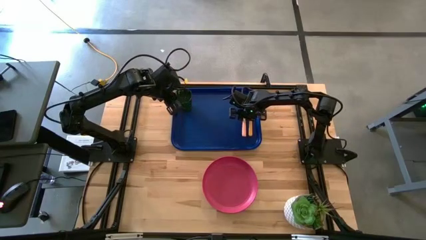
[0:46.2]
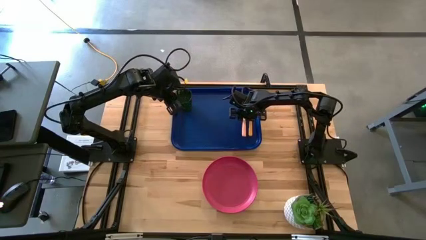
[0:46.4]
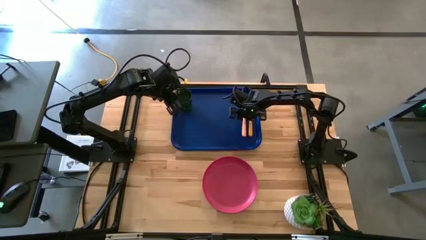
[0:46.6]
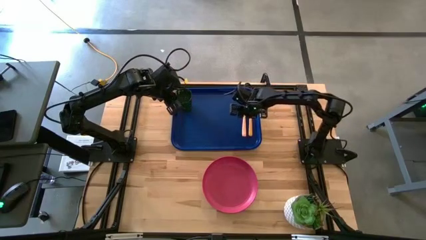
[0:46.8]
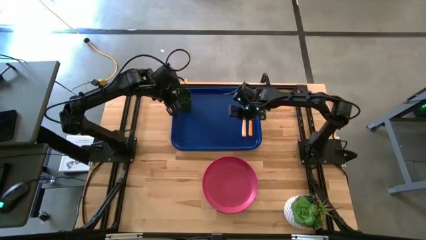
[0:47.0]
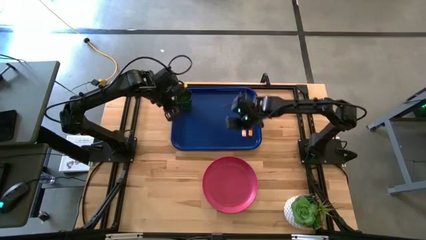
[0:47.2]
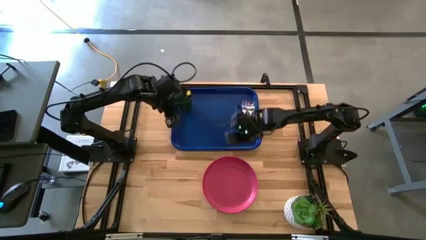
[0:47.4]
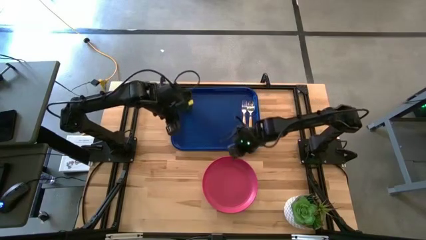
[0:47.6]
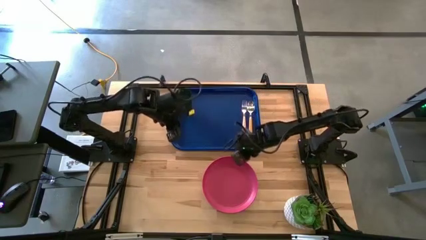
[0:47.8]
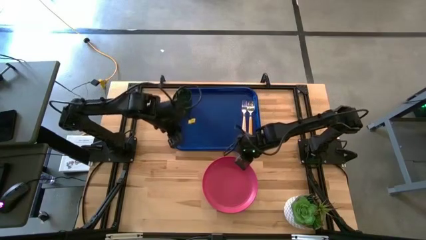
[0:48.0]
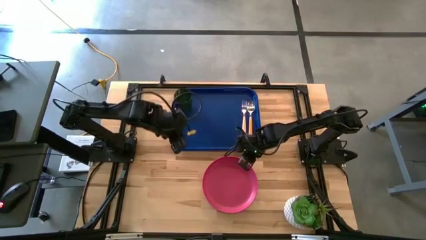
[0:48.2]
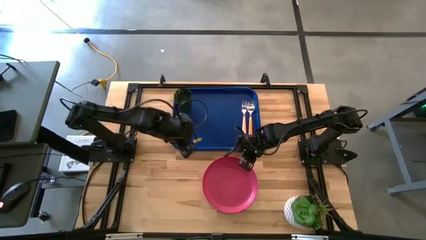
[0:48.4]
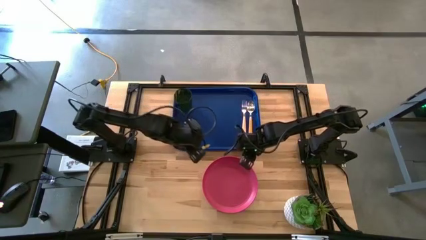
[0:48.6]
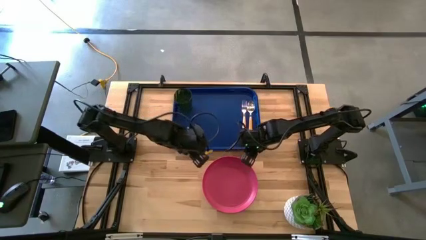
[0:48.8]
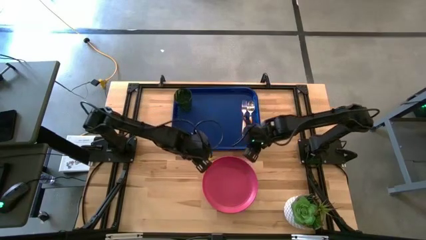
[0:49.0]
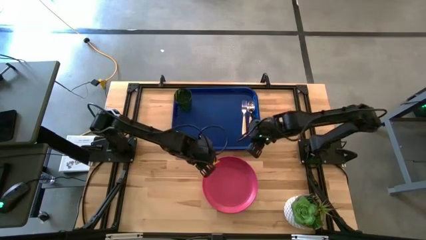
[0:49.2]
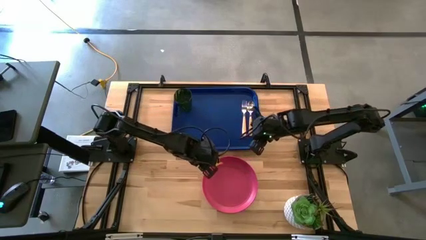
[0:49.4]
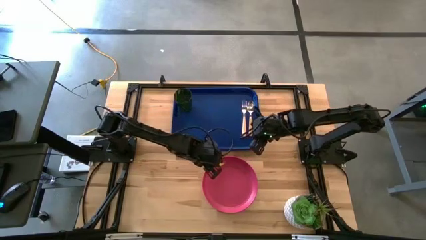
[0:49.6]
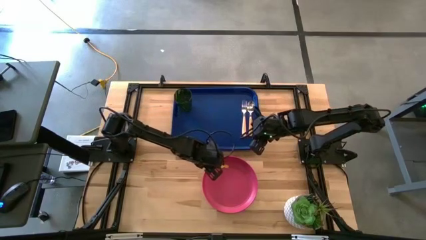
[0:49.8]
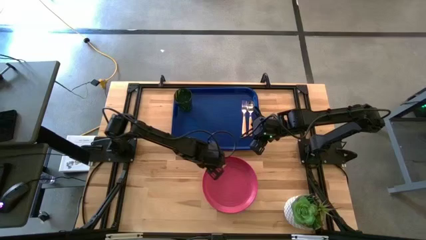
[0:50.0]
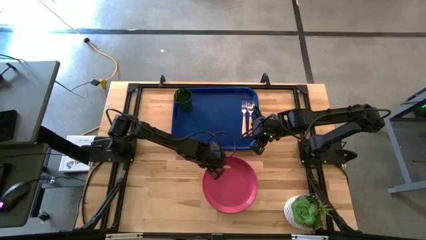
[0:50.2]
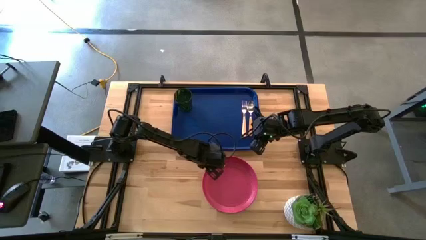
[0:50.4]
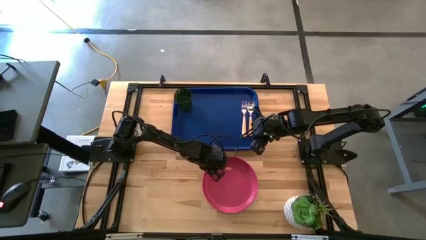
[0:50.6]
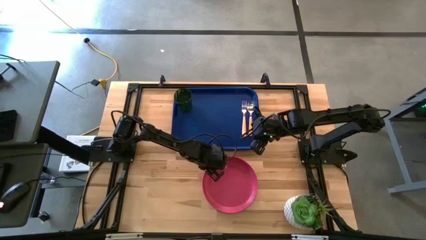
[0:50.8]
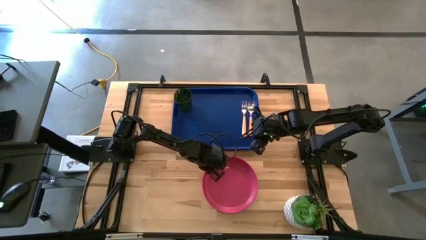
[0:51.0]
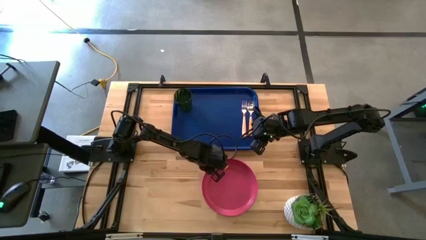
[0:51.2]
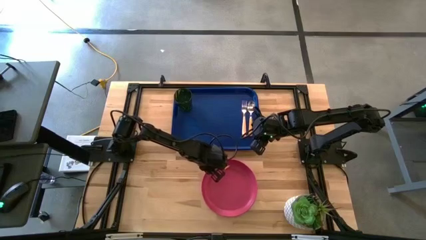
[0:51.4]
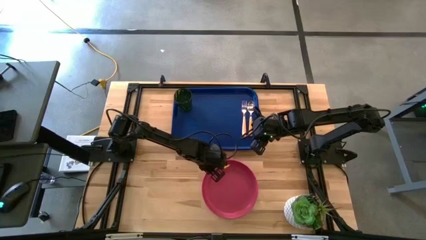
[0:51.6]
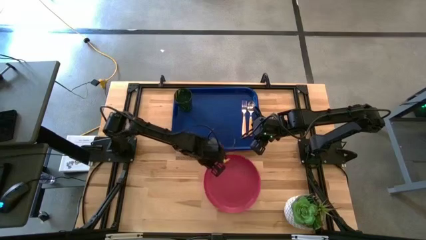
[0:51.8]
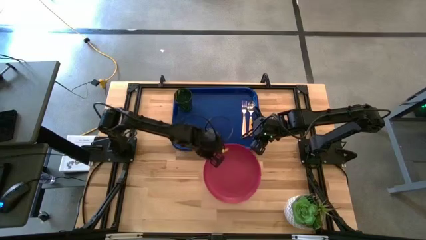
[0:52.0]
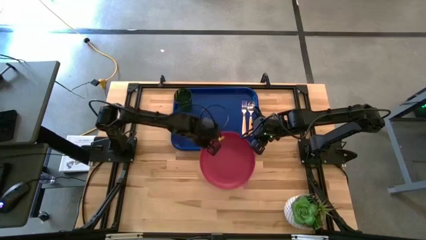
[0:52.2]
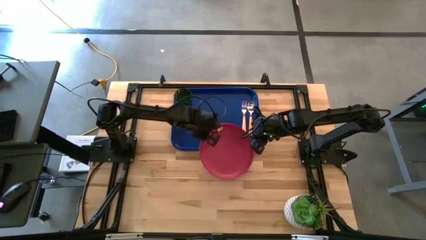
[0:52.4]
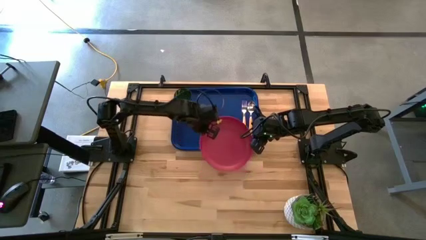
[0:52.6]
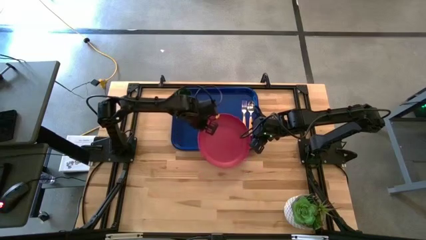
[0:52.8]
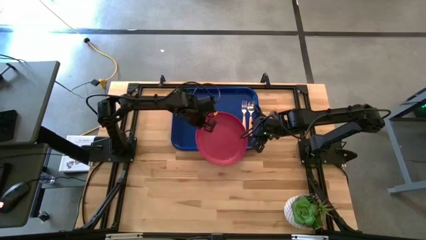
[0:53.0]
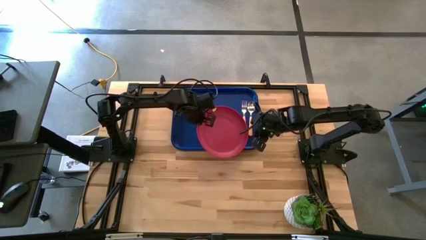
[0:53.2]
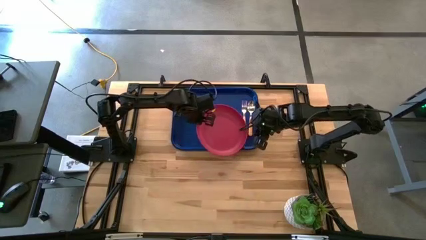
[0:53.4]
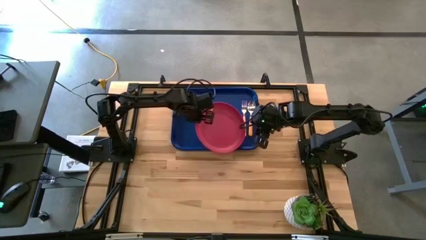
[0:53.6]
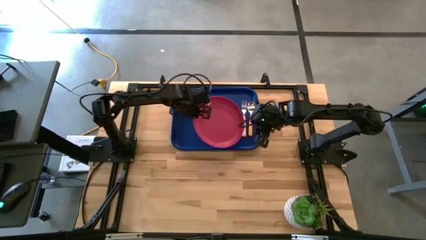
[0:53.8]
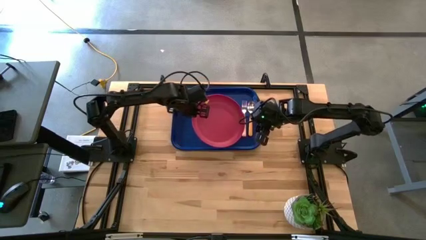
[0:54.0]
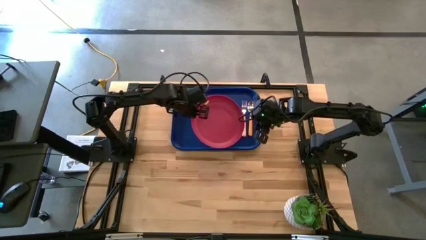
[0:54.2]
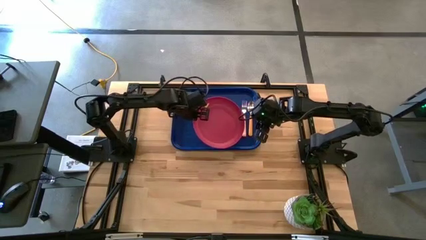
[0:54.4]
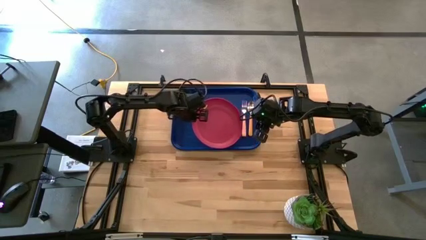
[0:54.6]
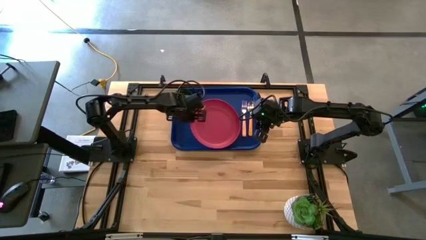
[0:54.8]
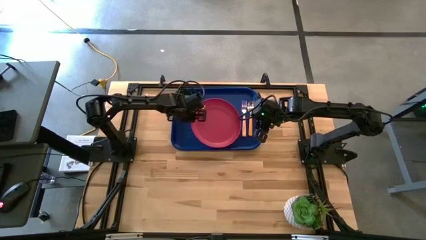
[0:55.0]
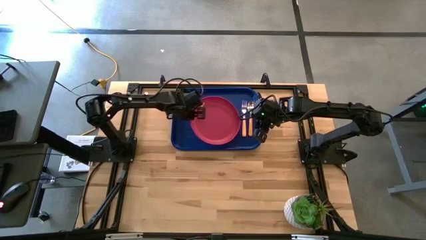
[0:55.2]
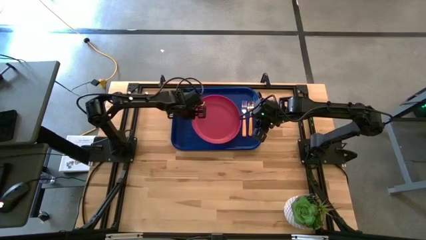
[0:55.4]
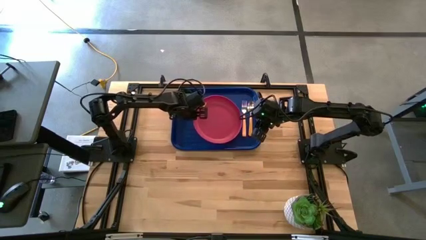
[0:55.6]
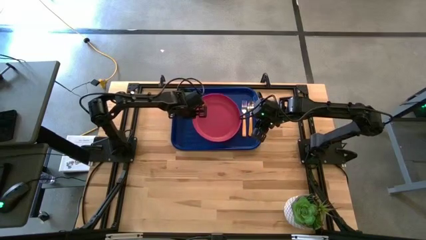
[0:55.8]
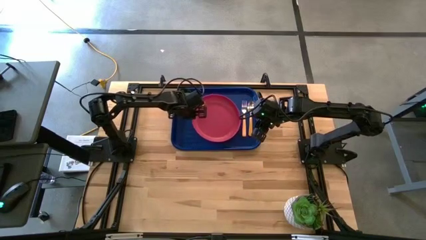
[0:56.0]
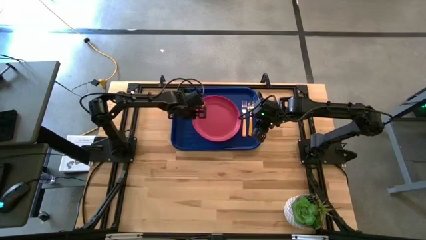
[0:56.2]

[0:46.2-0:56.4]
Task: Pick and place plate/cup/fork/spoon on tray
Put the red plate on the blue tray on the left of the brown fork

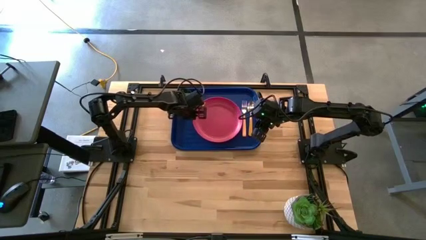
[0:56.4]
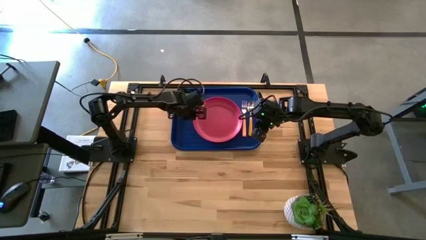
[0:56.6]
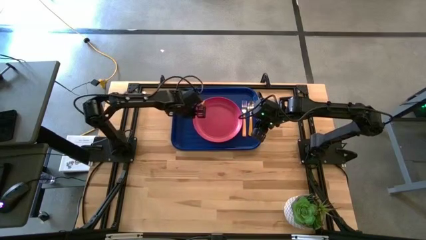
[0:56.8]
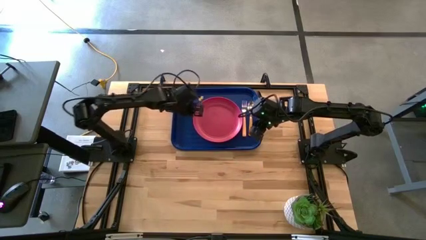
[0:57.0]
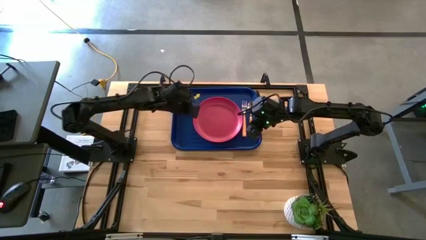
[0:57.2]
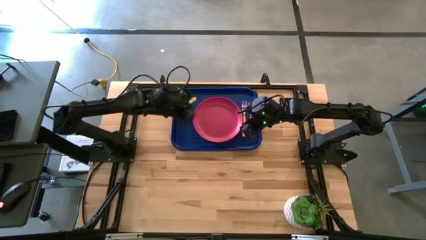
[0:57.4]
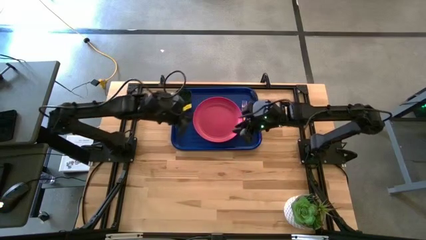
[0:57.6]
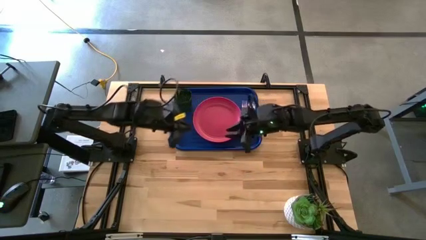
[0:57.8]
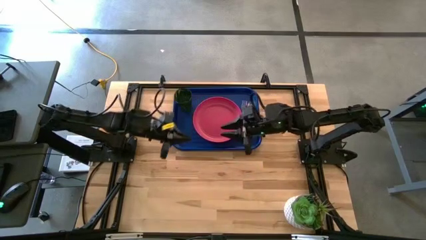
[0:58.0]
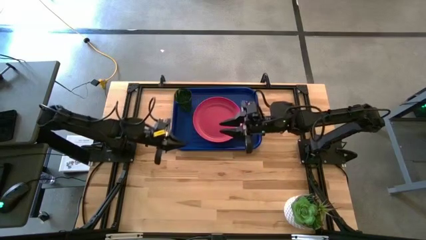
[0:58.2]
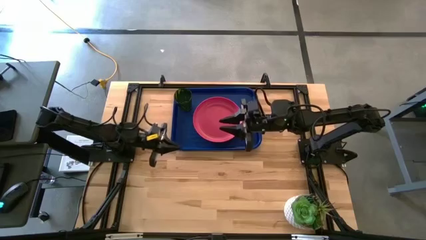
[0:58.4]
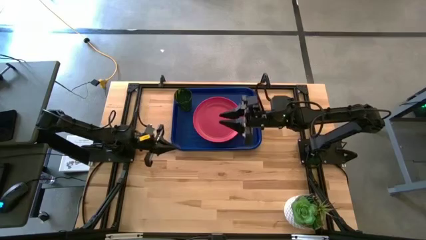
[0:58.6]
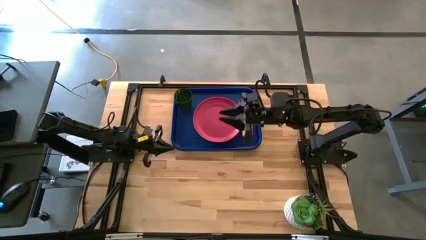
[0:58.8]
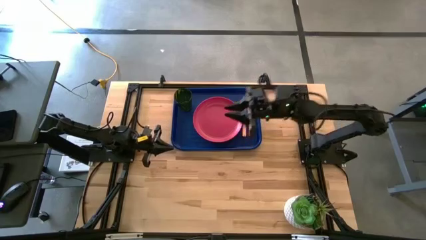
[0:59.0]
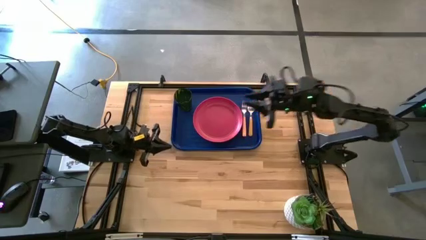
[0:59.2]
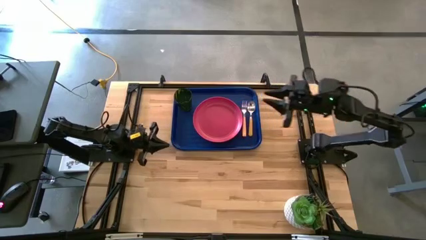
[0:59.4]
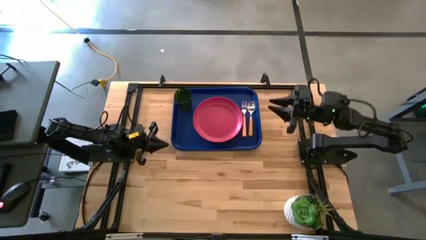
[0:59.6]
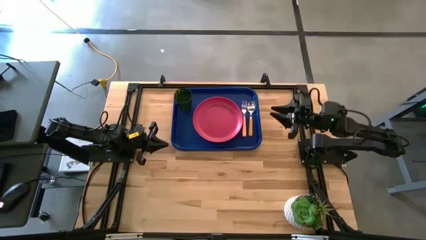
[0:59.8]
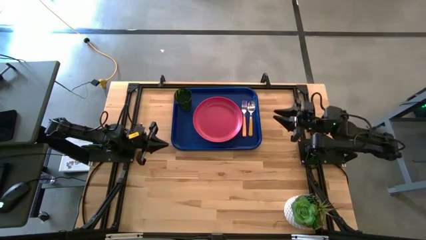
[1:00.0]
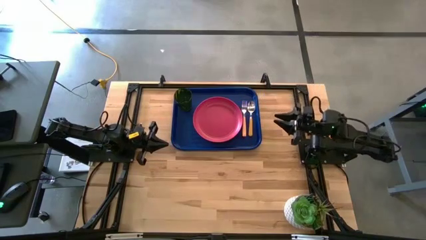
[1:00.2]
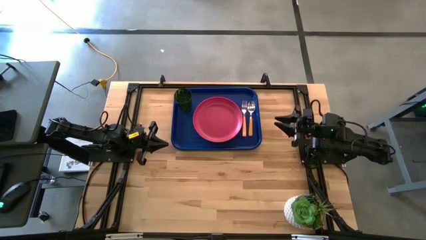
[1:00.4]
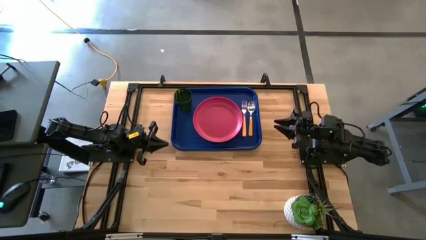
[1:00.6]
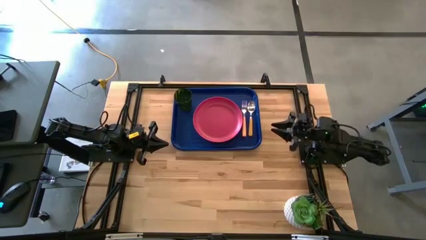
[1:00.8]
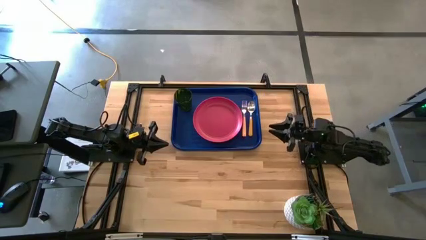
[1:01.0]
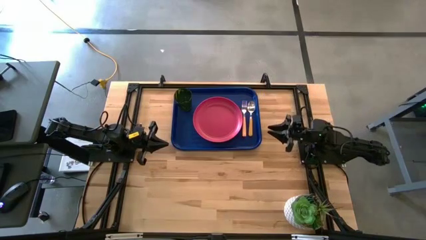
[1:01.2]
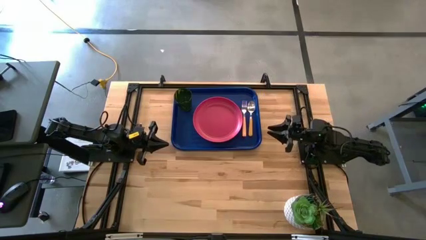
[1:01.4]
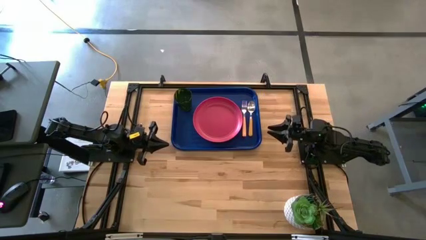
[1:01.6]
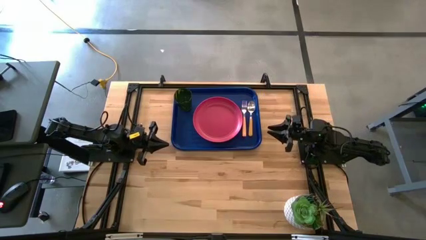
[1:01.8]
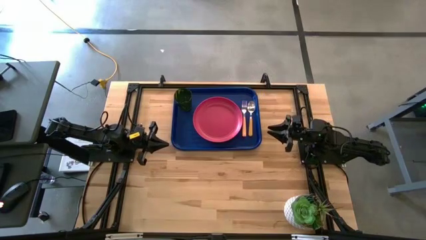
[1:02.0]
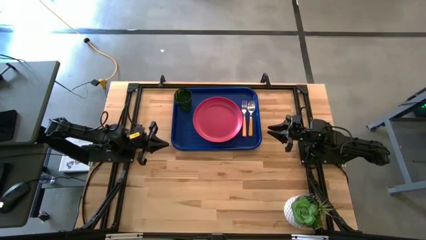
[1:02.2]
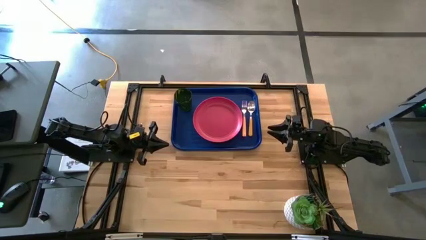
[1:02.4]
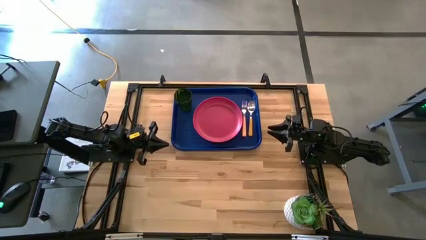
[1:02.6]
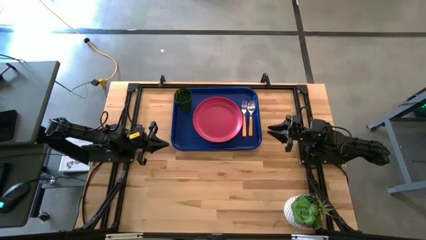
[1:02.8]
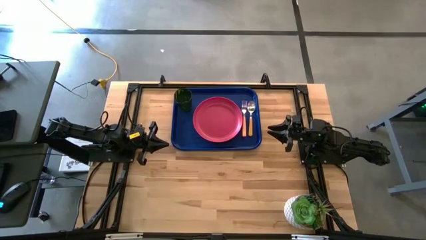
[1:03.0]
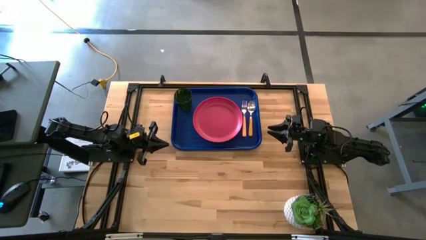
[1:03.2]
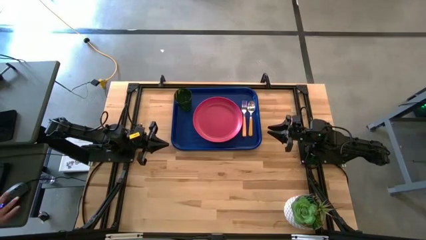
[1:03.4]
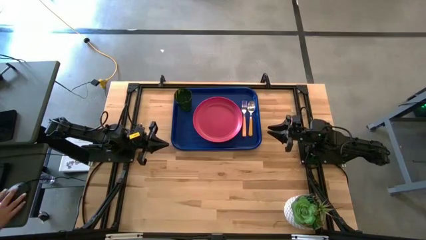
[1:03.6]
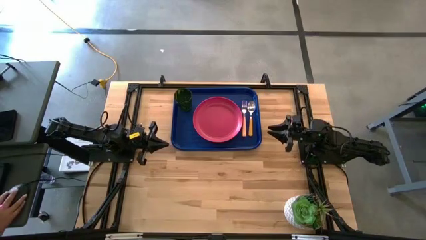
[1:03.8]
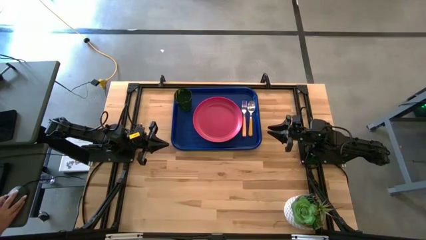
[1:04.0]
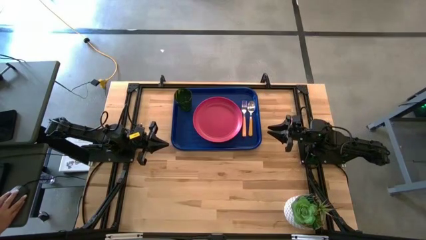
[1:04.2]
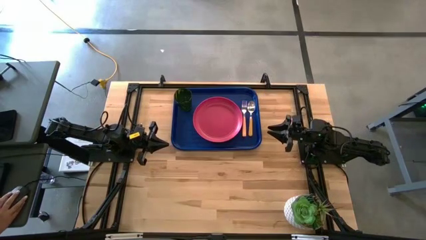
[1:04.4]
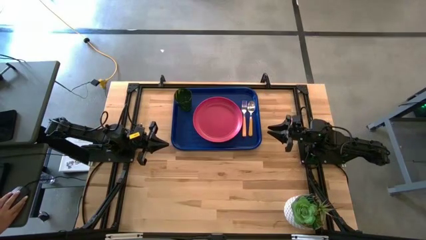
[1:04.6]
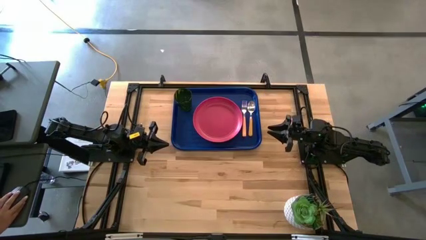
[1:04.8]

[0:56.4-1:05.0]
Return to Home Position
